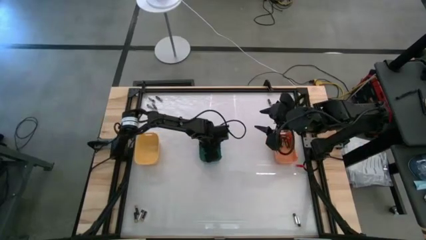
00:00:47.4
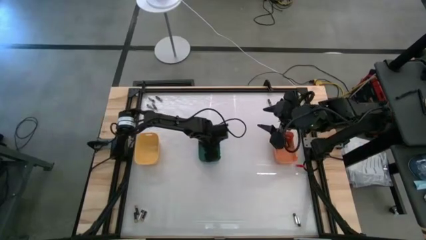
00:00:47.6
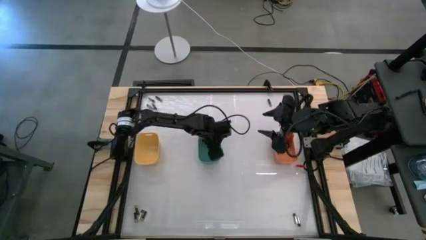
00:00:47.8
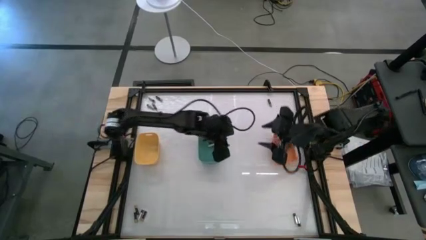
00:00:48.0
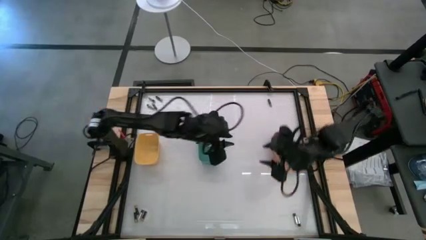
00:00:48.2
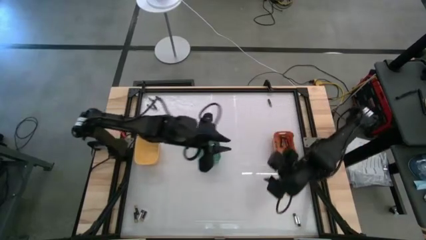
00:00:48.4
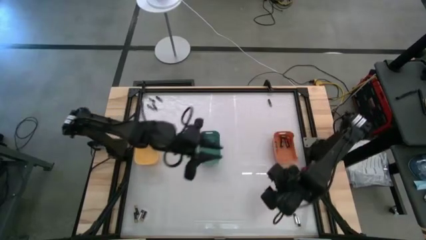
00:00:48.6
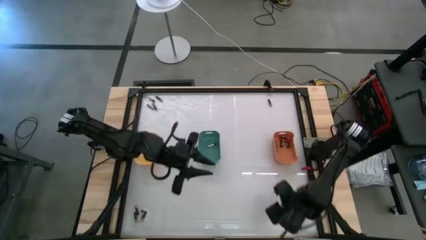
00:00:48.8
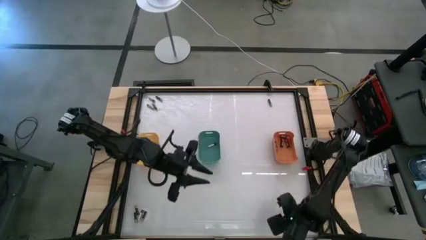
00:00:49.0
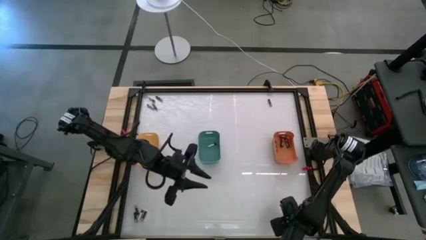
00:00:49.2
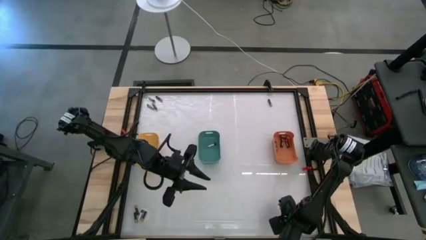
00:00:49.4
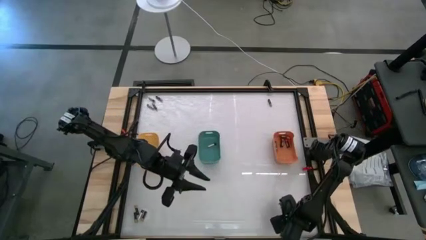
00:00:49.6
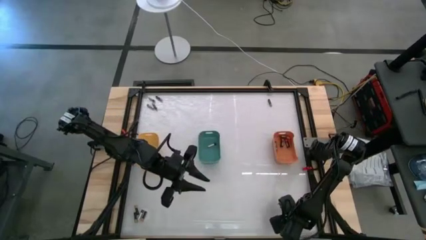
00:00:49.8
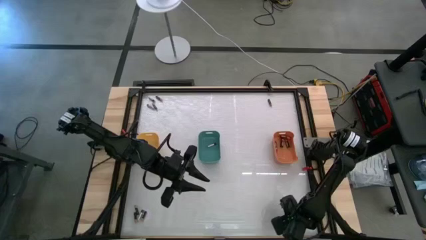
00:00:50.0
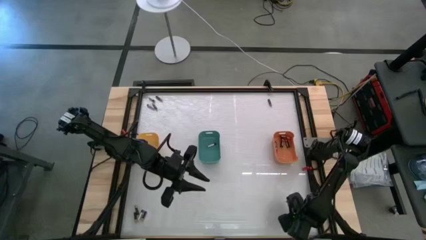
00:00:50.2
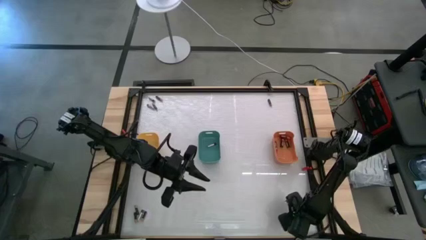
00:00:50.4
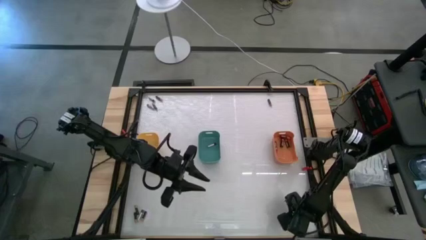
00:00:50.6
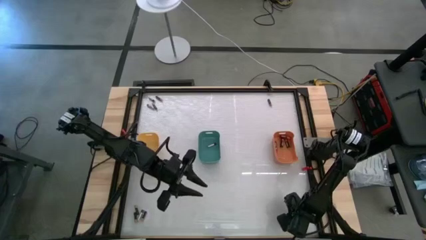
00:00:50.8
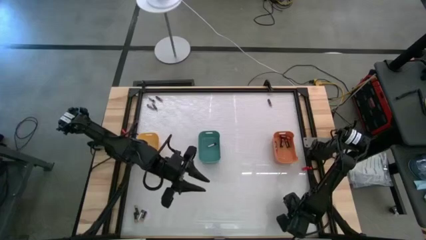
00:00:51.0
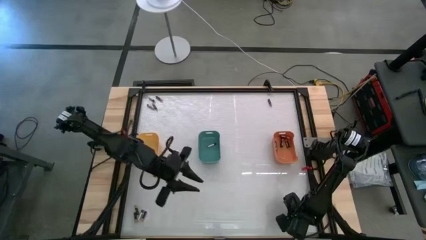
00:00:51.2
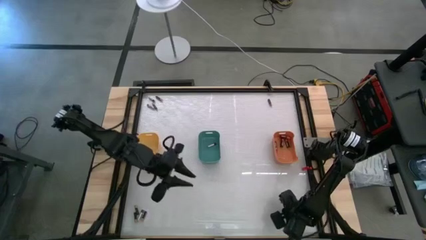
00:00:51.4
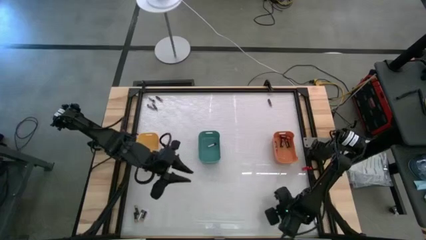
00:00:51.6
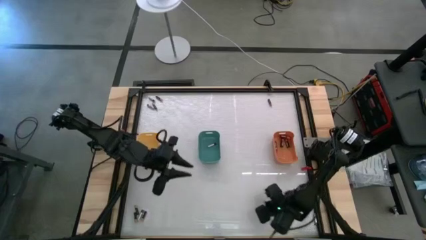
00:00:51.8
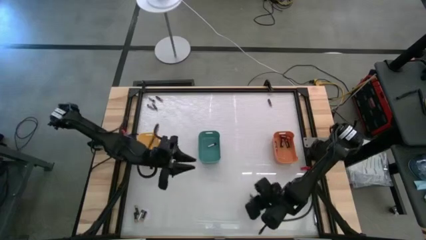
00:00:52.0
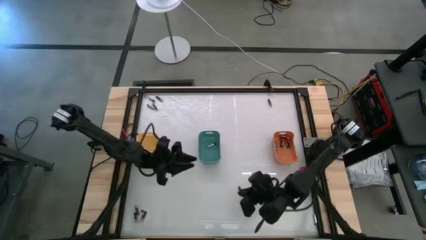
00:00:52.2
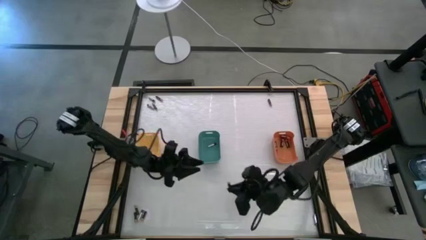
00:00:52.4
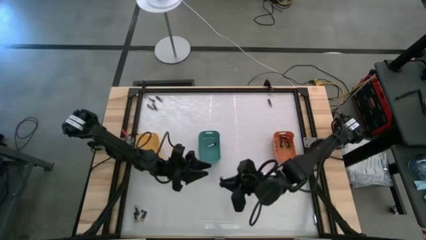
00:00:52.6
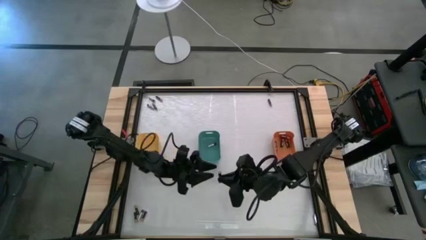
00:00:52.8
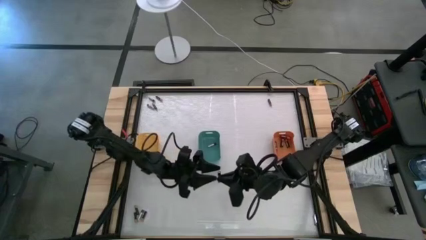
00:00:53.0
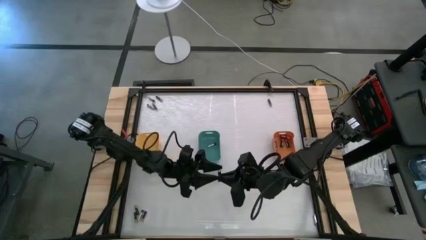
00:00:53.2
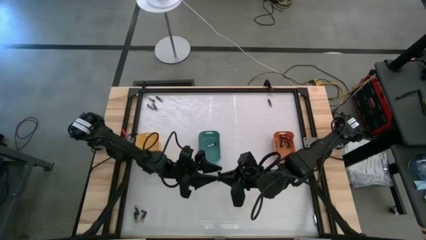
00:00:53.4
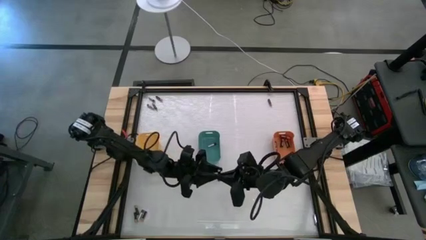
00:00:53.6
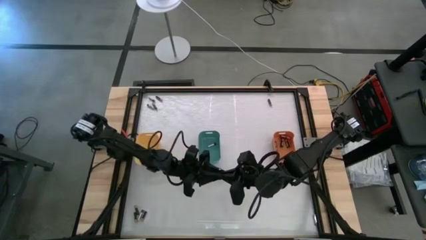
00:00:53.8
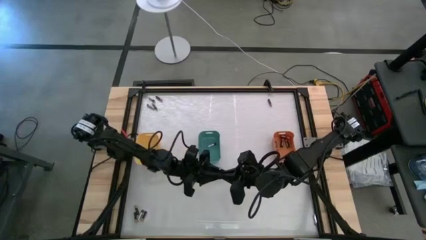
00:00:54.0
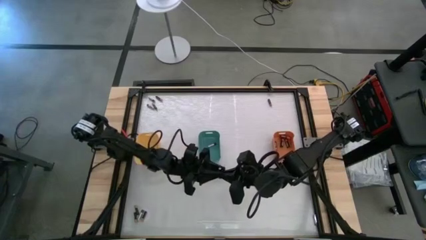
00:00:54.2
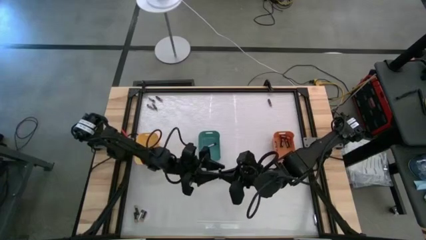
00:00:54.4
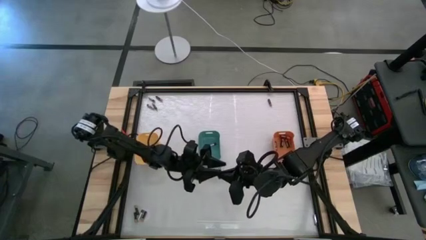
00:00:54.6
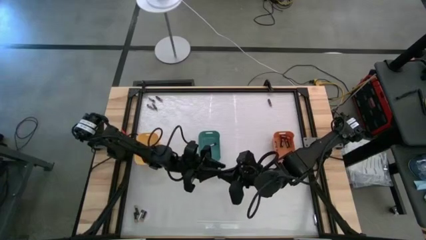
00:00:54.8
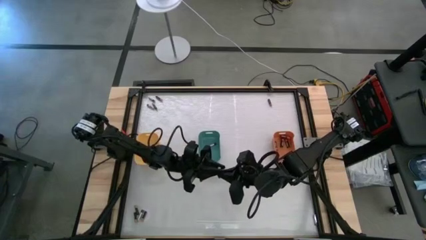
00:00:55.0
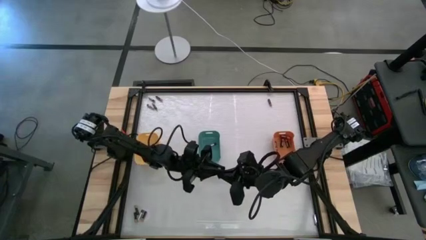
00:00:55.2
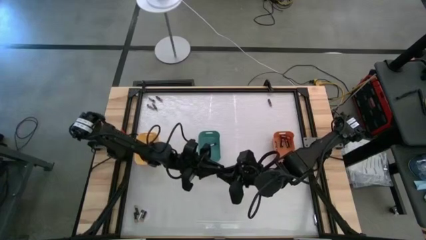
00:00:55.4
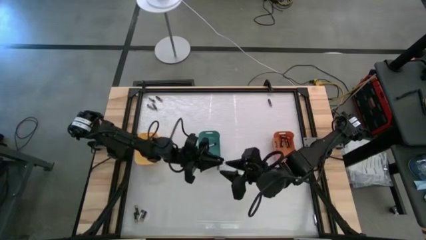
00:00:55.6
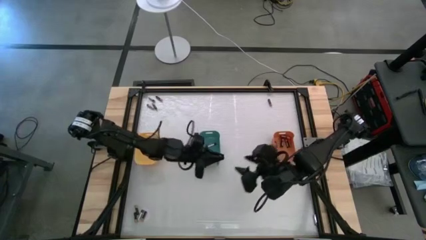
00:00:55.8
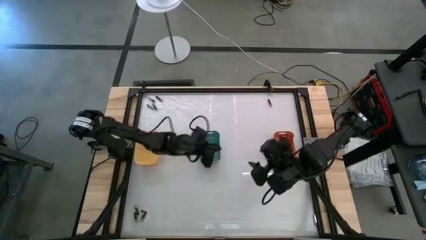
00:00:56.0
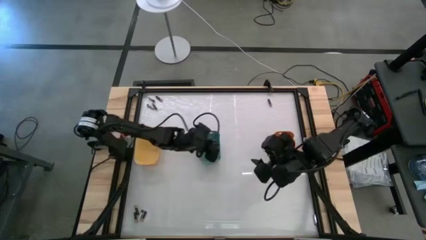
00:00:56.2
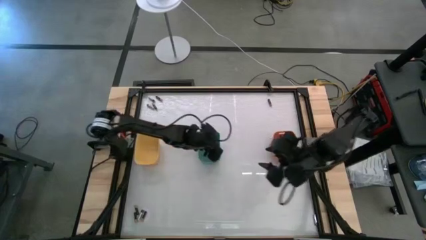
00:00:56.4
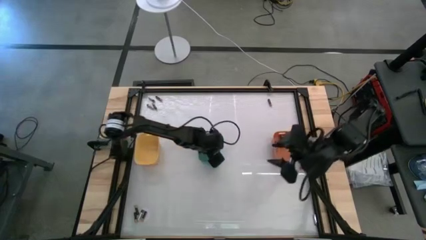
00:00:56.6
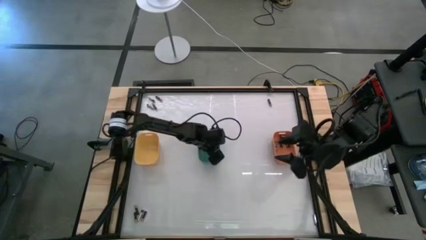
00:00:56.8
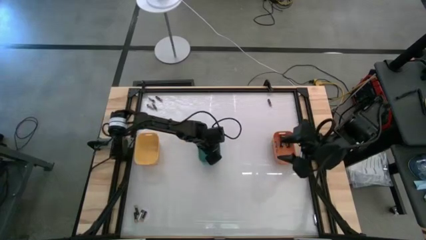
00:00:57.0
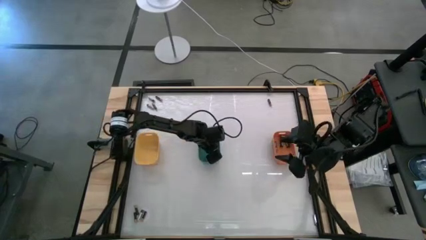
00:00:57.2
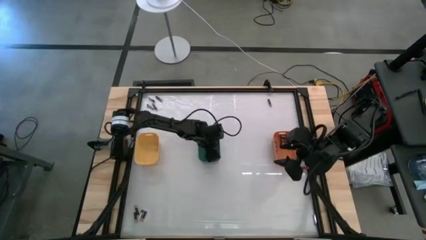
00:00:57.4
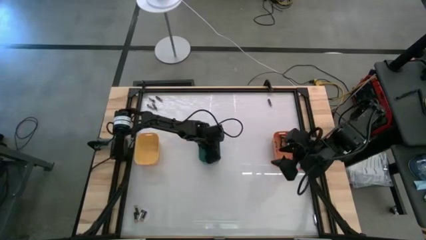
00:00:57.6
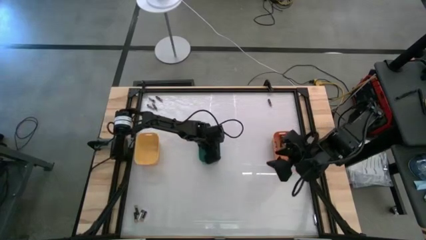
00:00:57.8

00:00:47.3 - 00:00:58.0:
Task: Sort batteries
Put the silver battery into the green bin

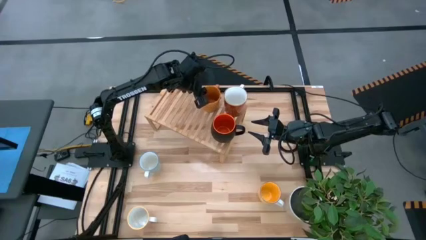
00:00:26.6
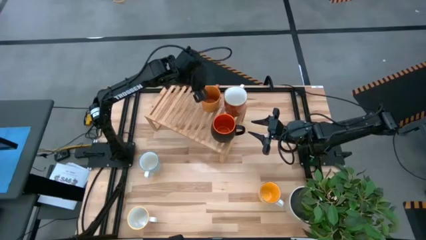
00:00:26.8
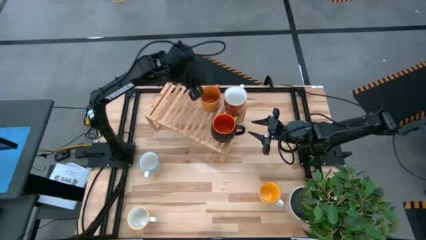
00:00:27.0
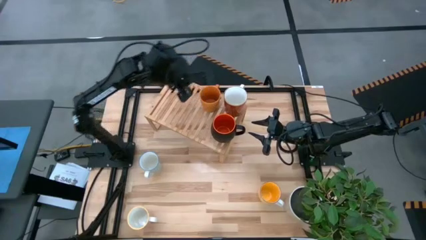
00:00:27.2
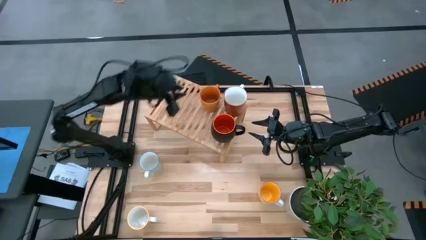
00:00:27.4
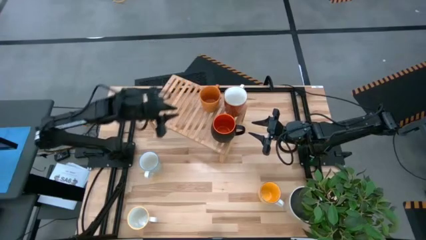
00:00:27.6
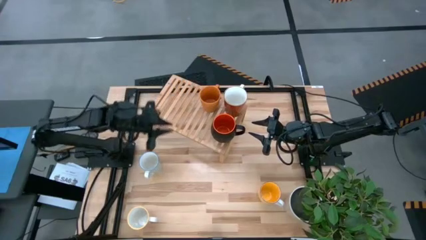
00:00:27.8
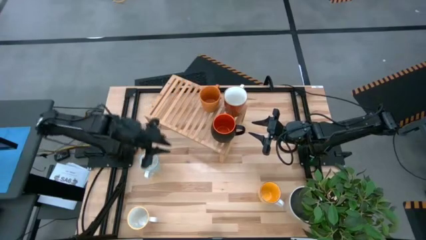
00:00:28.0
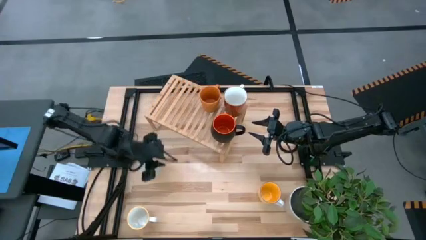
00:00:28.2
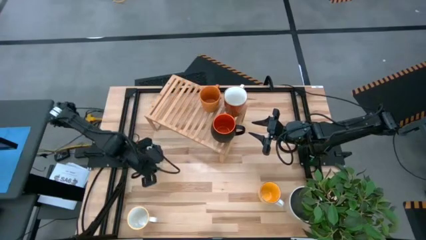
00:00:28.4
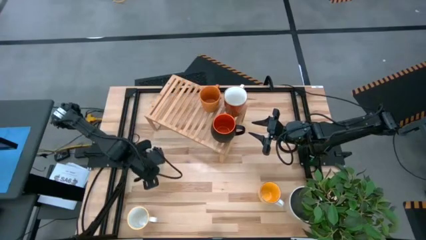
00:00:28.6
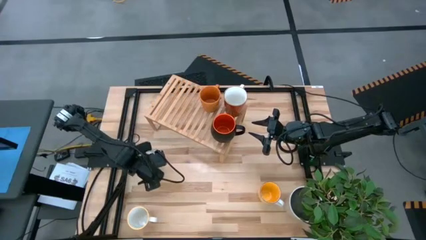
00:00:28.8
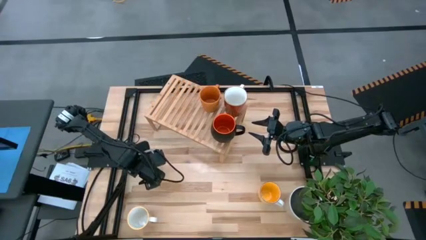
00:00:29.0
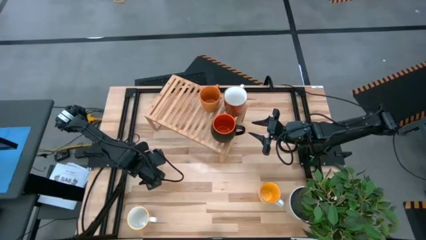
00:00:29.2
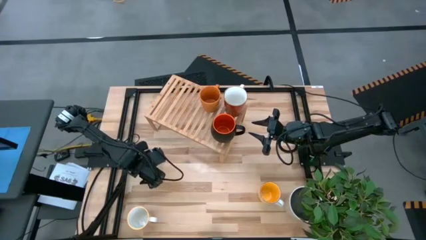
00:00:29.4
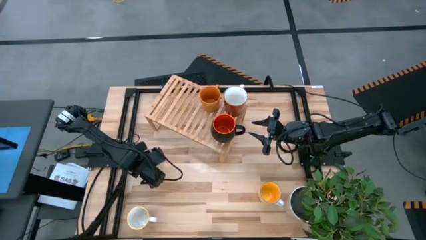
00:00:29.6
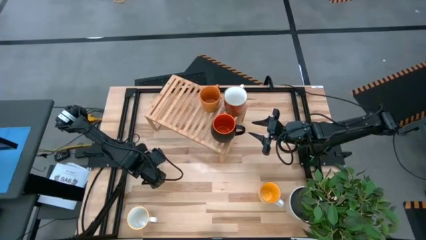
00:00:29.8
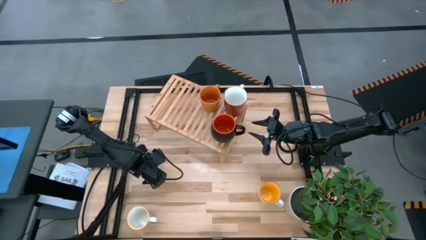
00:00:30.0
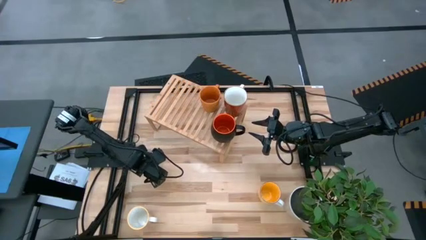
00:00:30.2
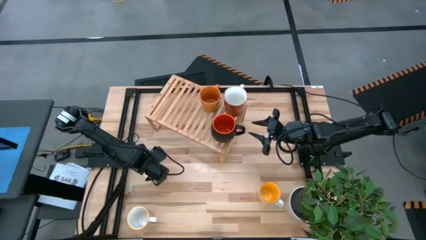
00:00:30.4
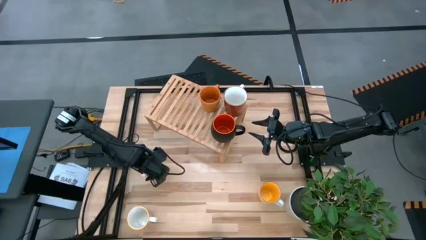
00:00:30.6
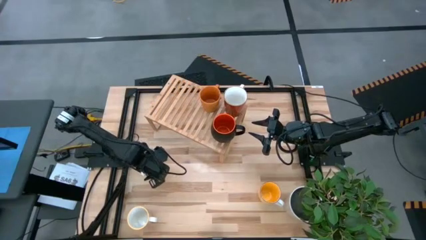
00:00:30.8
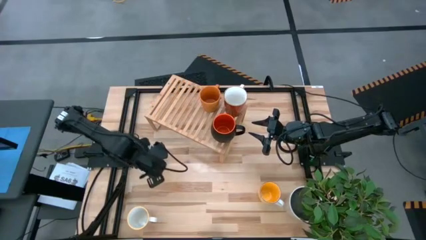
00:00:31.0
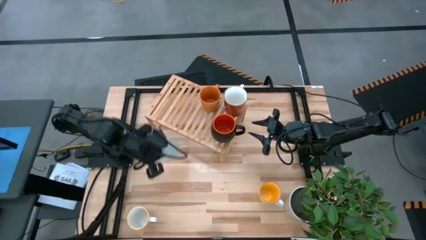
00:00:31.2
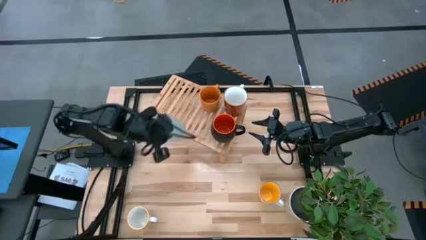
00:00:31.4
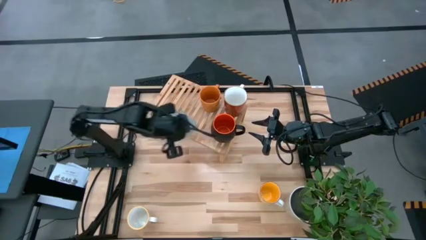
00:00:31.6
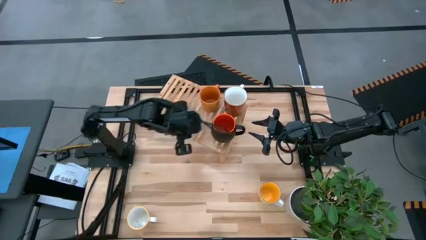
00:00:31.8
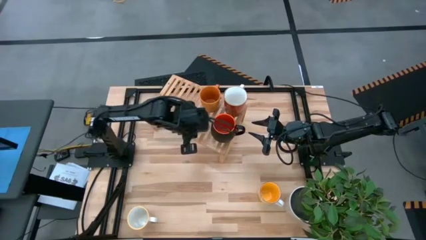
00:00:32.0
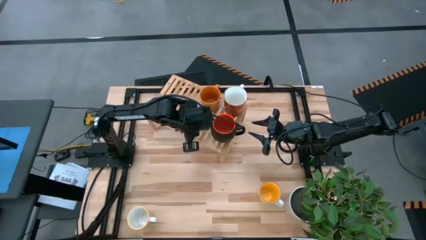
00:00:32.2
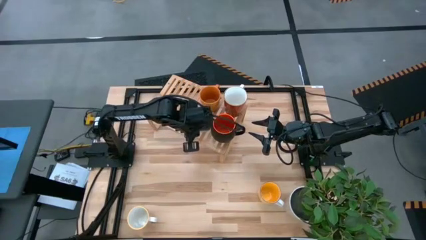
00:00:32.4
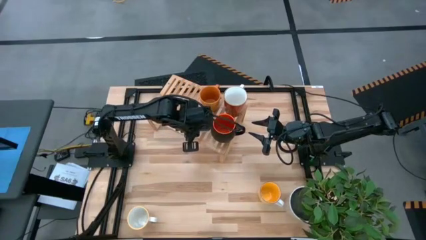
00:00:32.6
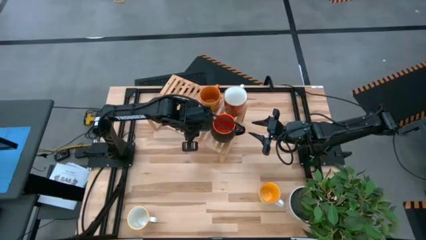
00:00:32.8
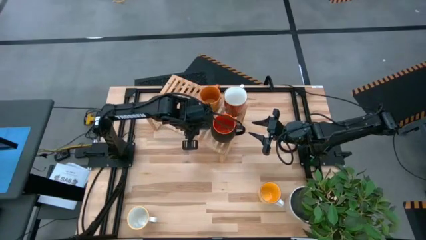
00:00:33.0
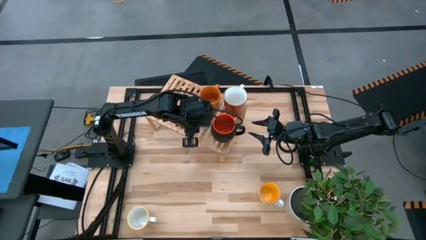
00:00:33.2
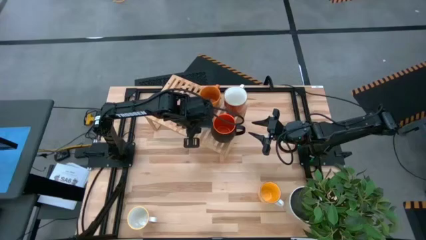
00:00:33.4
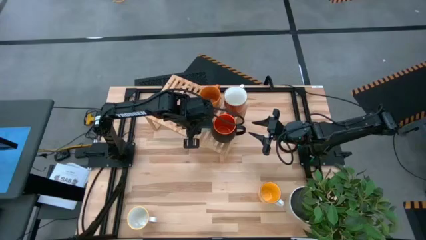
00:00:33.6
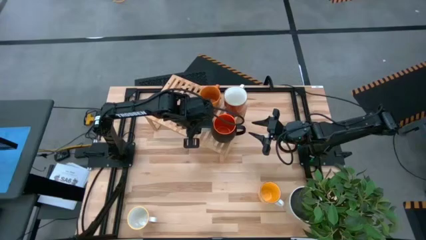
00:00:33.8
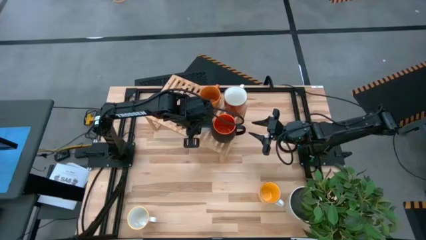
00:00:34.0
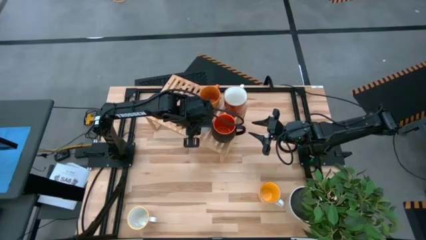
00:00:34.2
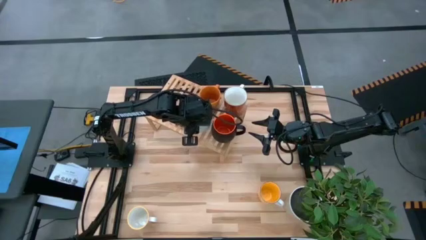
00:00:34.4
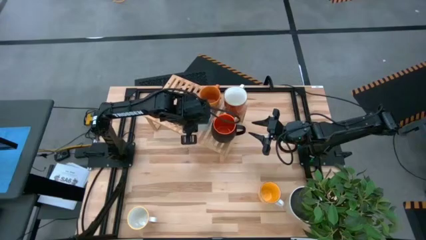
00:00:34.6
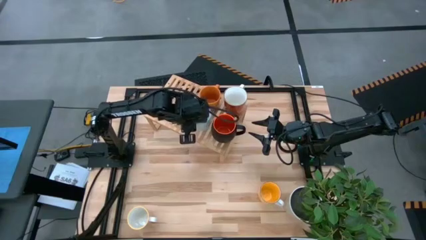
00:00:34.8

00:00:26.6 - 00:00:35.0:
Task: Place coffee mugs
Put the blue patterned mug on the shelf
